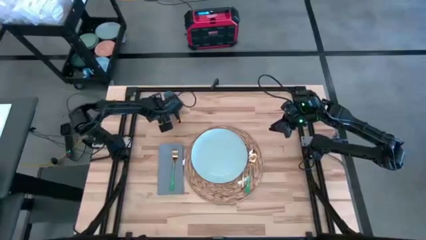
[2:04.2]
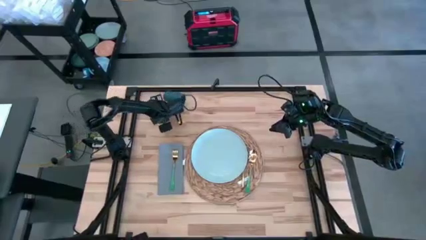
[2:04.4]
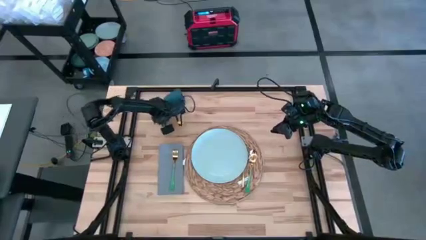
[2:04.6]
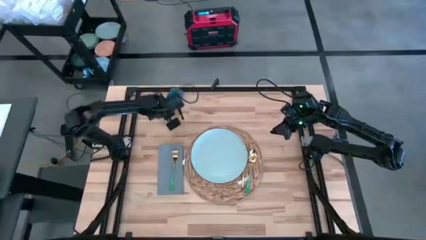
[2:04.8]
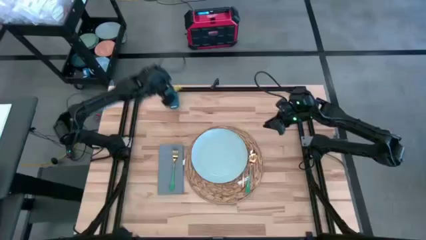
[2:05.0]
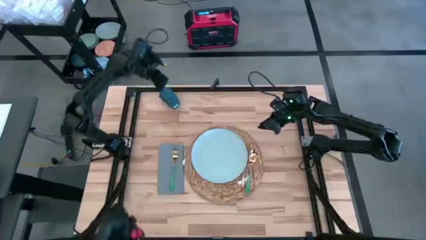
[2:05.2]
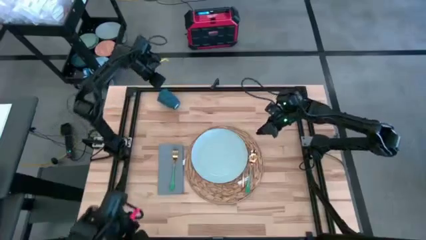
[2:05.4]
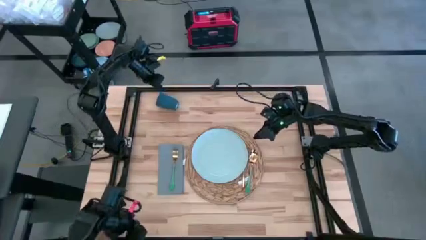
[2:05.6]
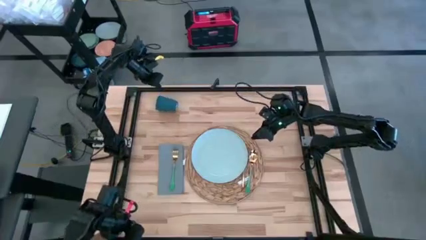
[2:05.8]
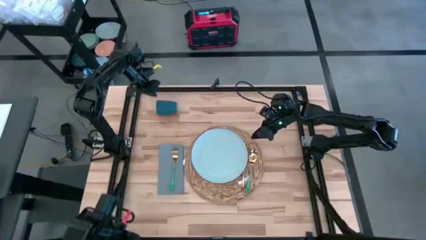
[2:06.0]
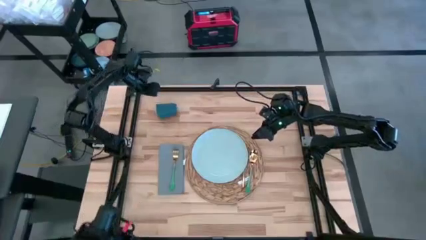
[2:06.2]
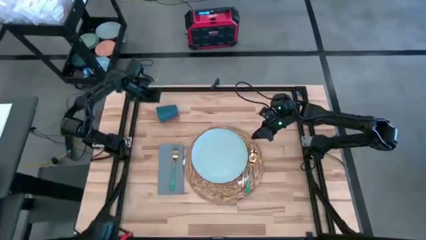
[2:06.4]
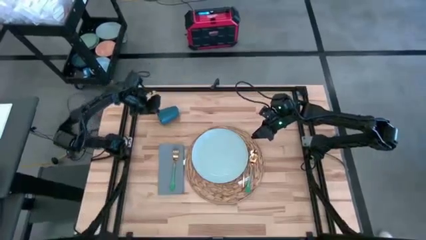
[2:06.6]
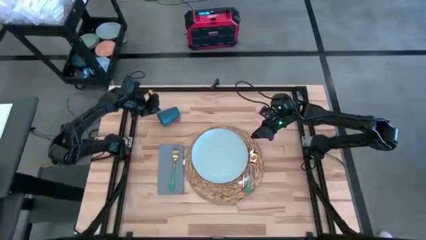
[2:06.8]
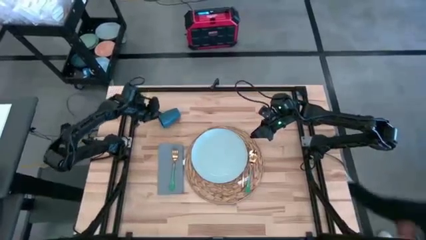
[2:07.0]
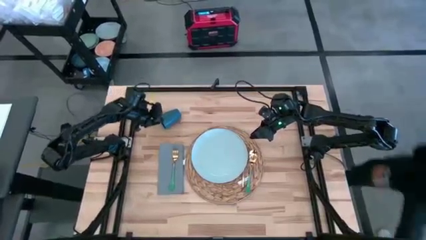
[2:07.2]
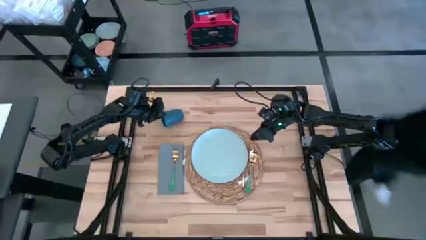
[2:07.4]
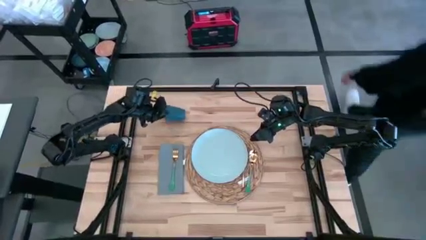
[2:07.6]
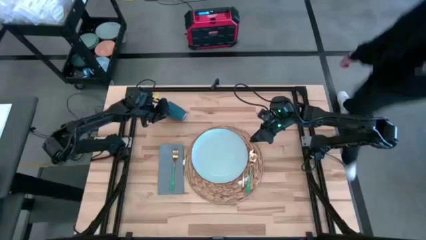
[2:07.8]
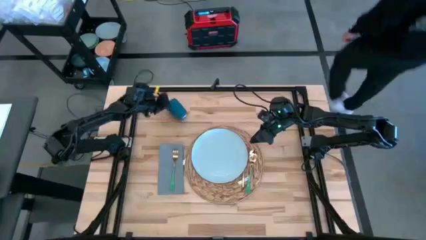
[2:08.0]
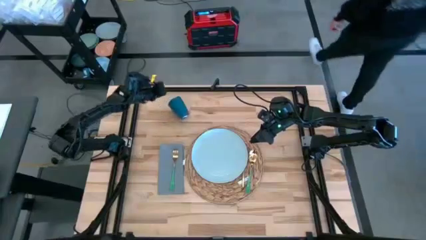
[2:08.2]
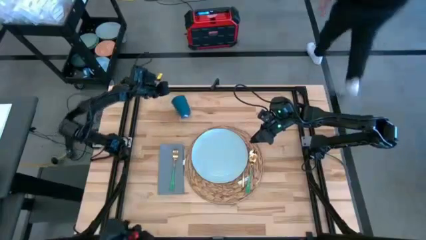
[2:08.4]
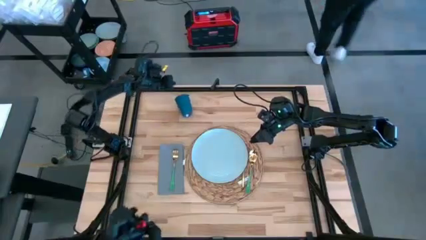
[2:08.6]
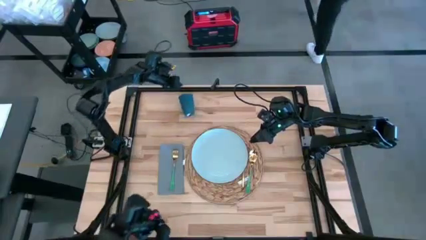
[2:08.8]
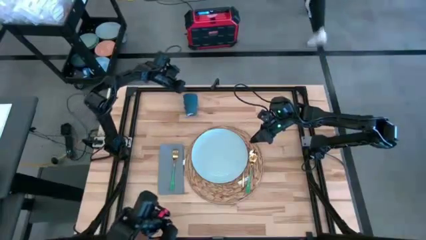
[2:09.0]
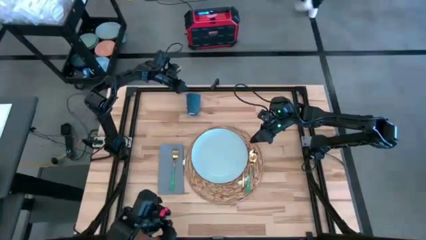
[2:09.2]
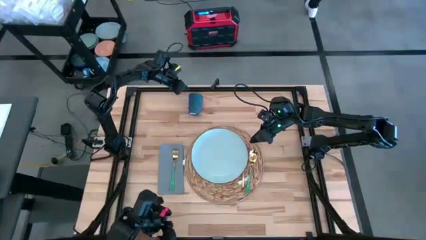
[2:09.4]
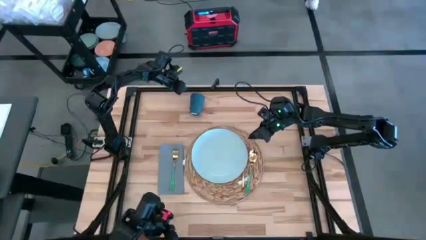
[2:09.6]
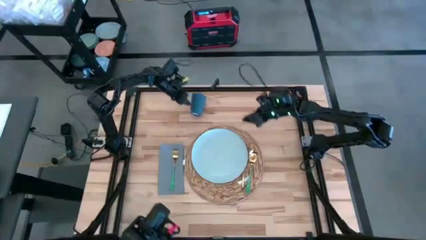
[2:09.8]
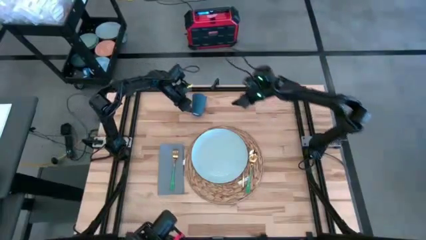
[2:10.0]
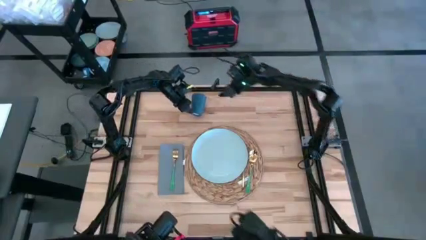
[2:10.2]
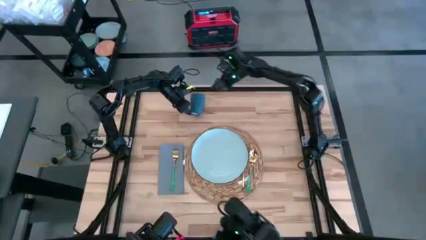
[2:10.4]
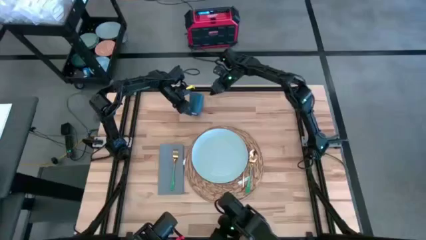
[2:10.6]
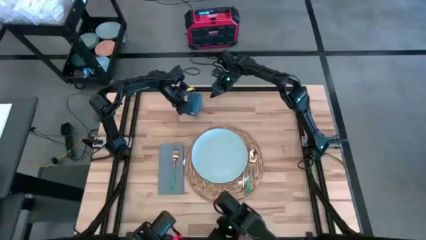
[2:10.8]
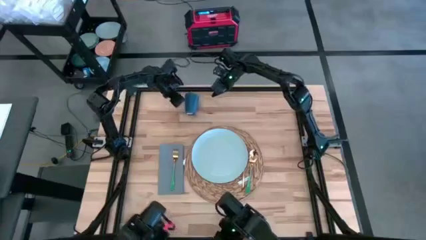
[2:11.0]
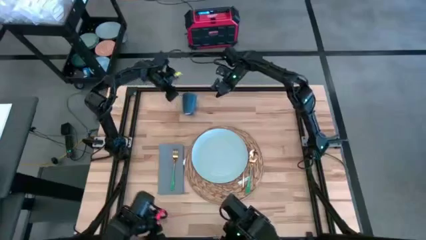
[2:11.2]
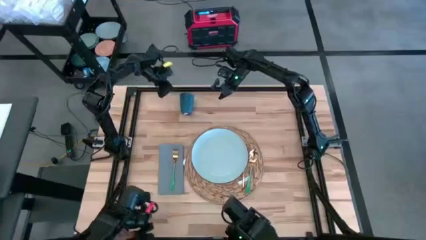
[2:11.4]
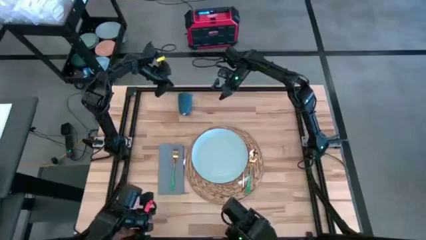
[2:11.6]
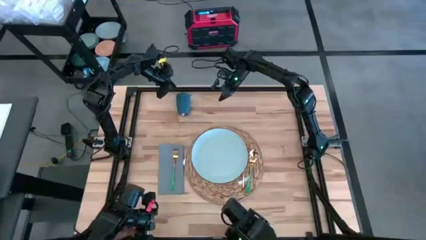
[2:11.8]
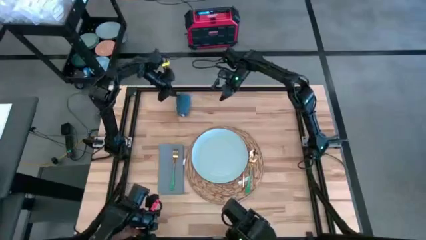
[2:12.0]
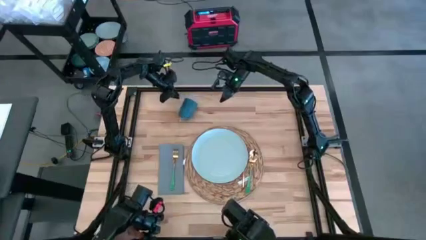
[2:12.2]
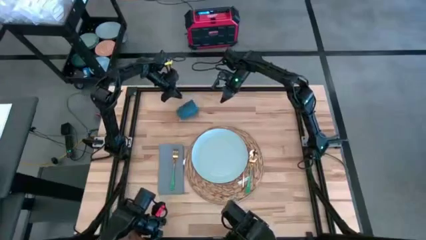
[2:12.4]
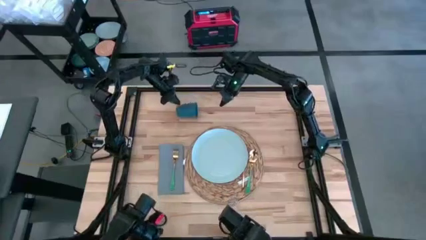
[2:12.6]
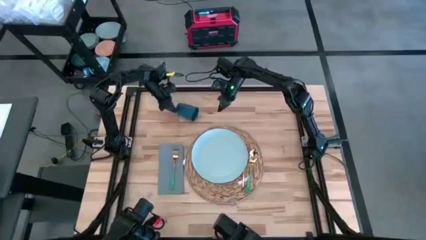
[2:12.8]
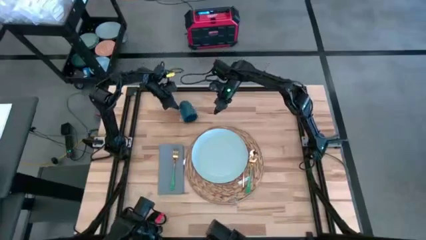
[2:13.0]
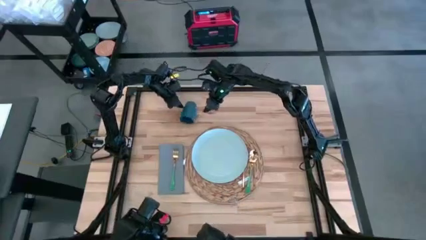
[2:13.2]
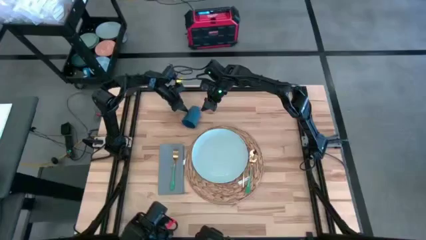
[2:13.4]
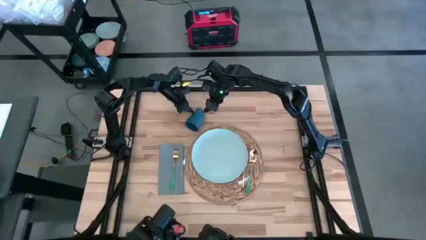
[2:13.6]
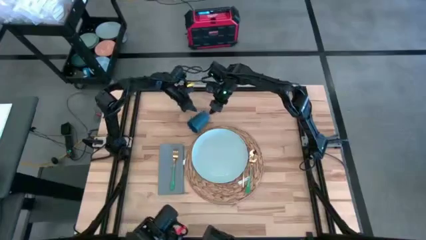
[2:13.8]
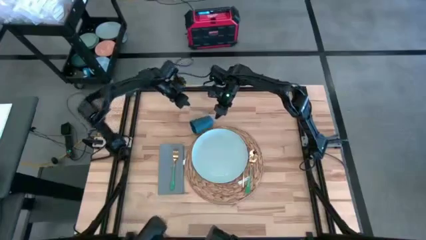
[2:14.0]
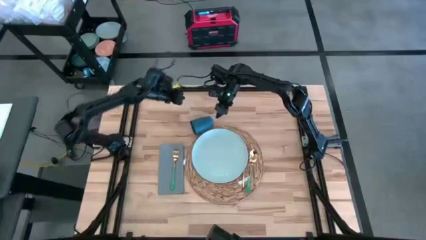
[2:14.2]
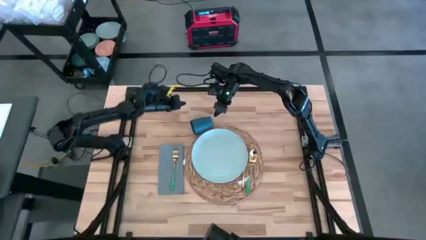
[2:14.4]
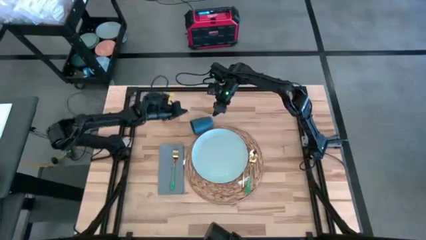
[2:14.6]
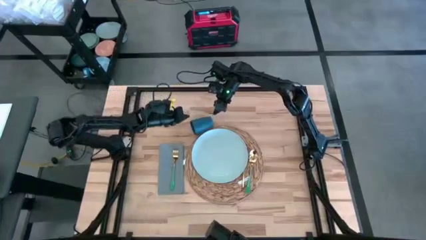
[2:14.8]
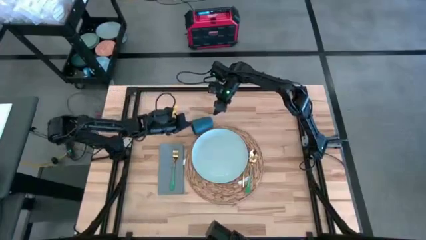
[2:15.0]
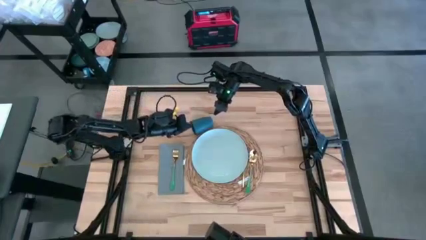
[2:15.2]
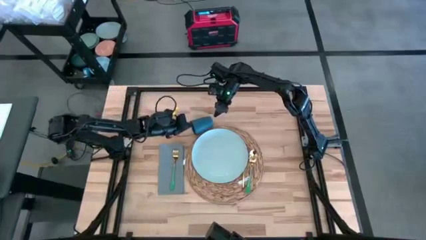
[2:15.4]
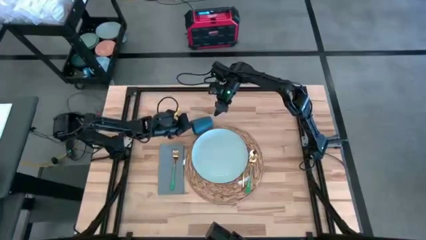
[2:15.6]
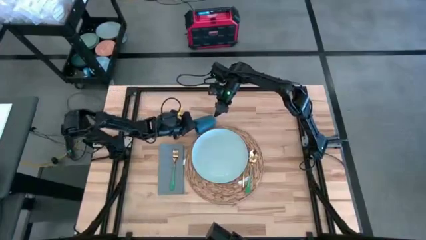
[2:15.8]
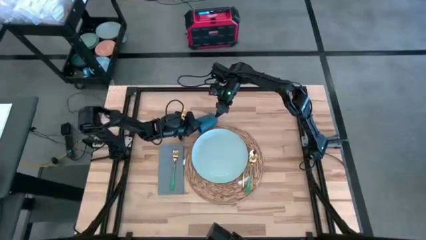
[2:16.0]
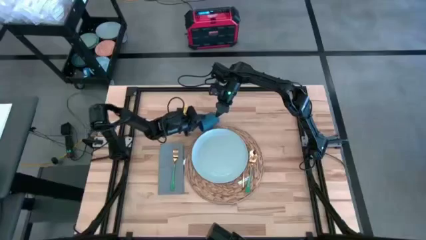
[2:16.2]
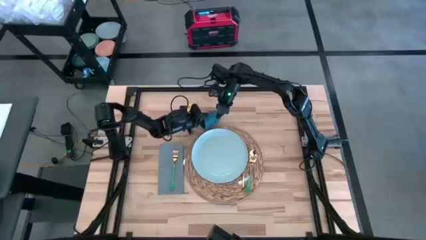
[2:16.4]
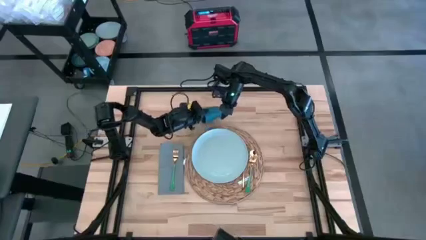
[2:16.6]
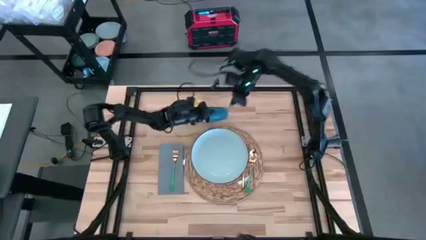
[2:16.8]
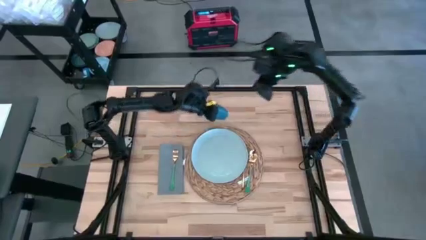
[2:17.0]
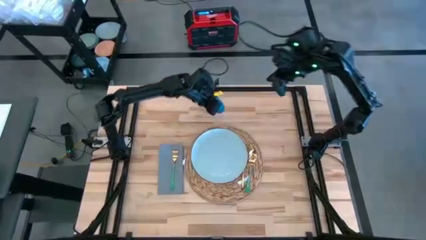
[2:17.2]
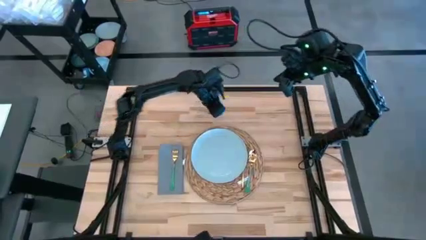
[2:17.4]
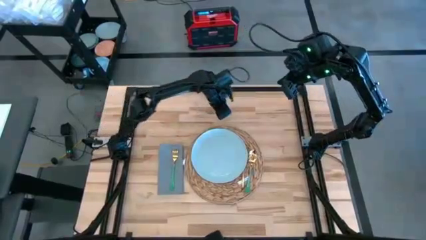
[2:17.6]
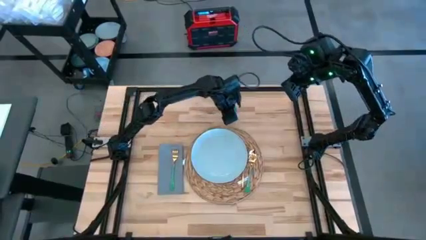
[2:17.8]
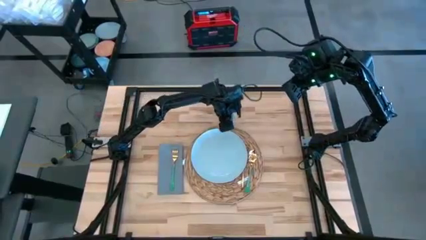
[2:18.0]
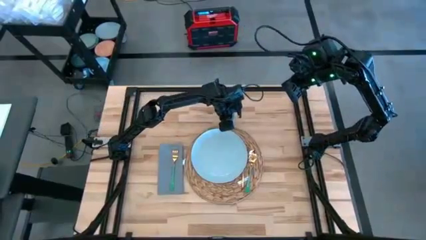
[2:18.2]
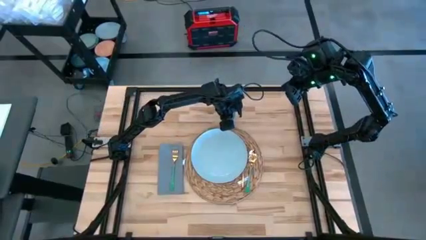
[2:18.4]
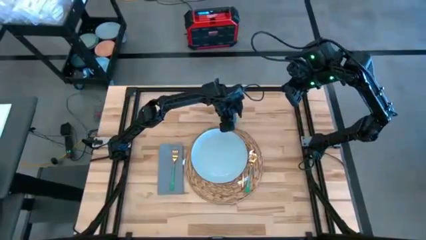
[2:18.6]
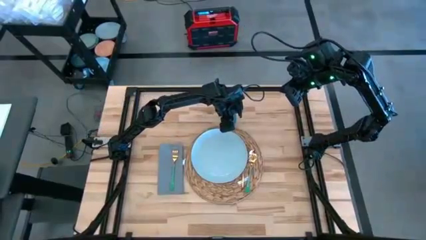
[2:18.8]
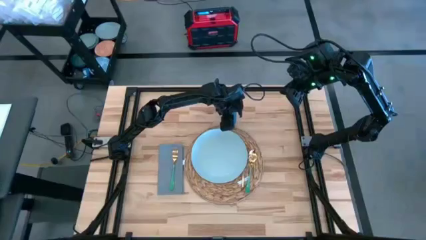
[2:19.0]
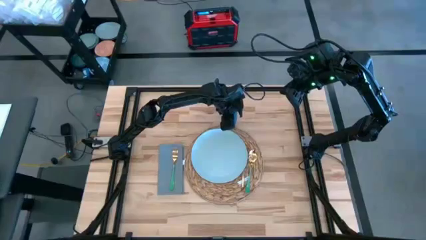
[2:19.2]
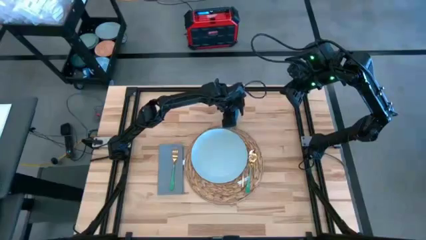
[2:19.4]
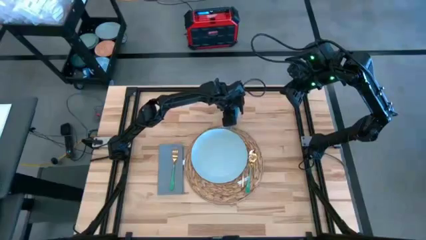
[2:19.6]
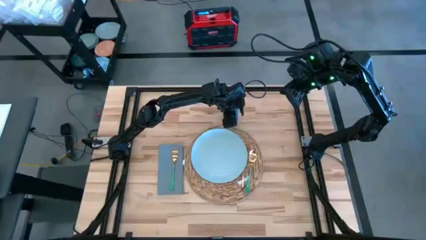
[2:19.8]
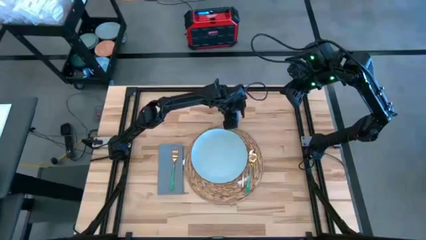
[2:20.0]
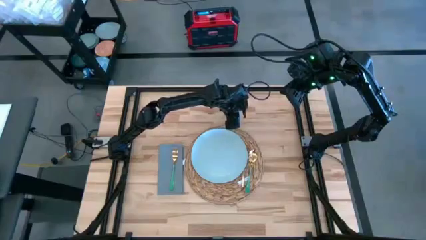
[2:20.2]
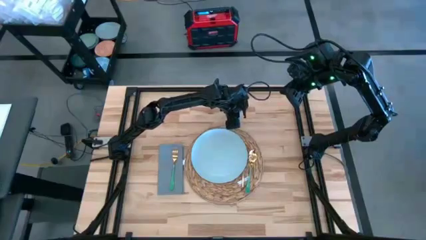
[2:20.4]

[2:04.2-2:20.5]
Task: Set table place
Move the blue cup to the top of the brown placemat

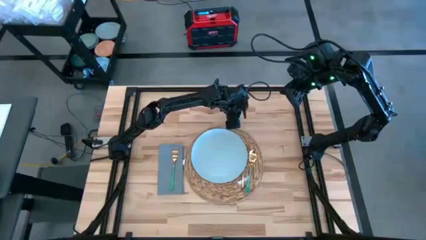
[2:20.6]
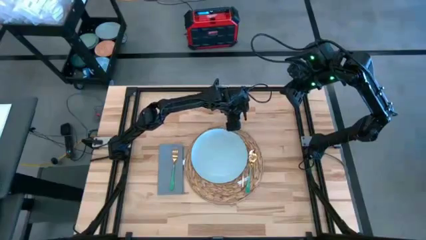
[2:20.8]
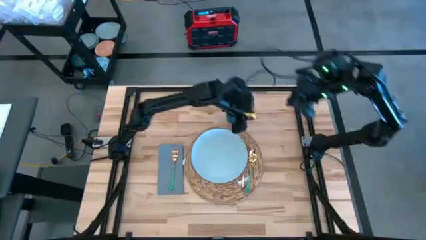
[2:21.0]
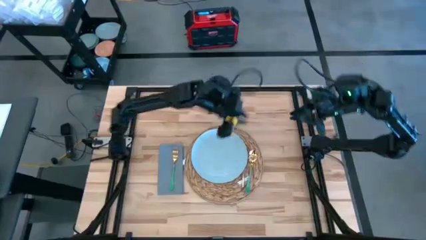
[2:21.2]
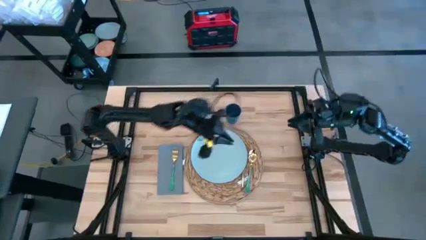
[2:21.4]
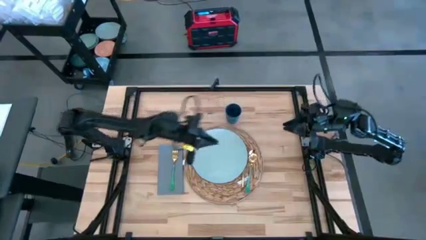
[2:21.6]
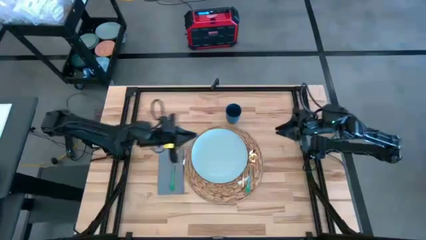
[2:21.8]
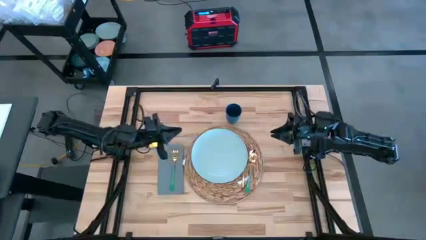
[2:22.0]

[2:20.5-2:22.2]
Return to Home Position
